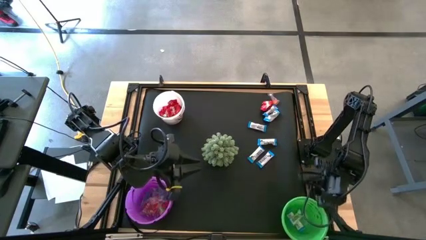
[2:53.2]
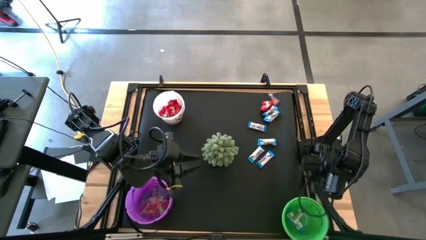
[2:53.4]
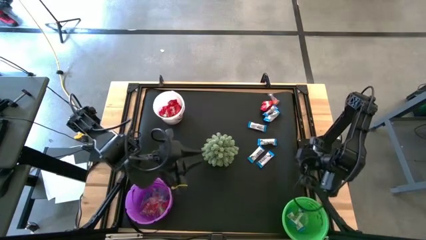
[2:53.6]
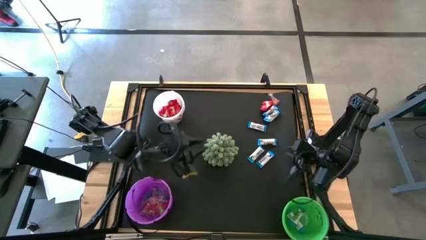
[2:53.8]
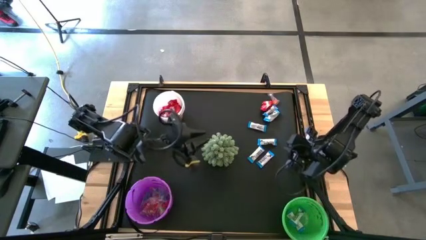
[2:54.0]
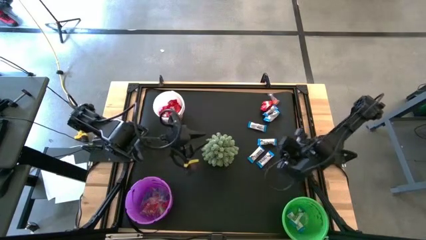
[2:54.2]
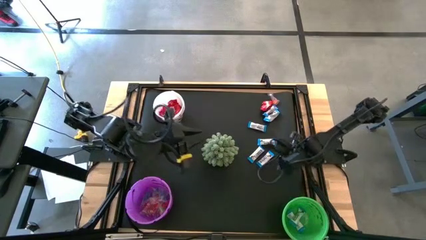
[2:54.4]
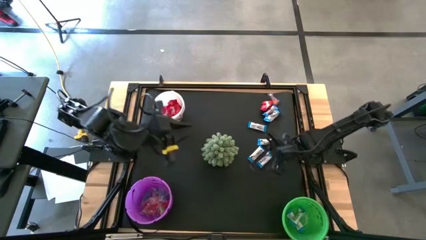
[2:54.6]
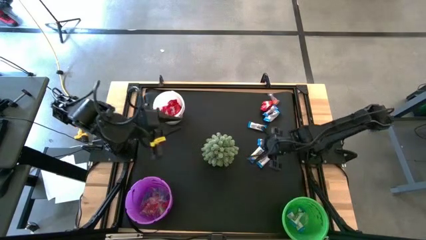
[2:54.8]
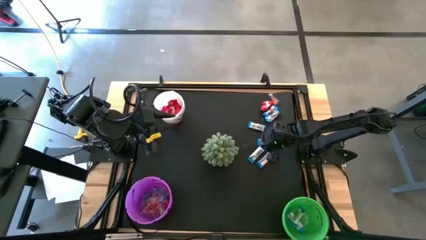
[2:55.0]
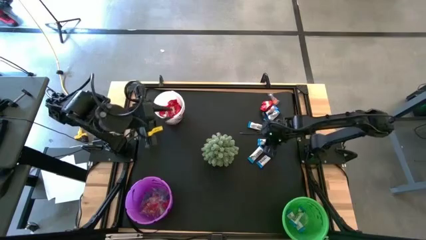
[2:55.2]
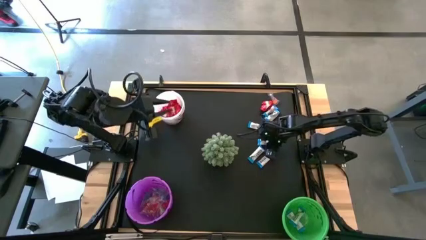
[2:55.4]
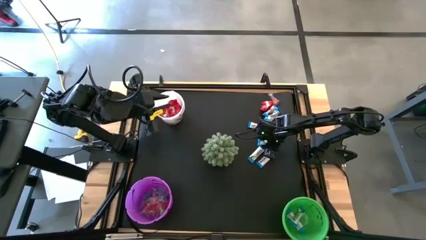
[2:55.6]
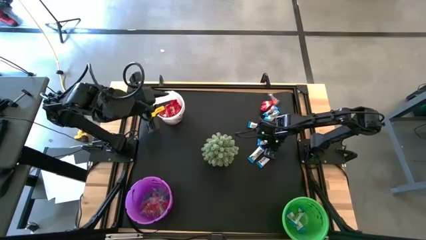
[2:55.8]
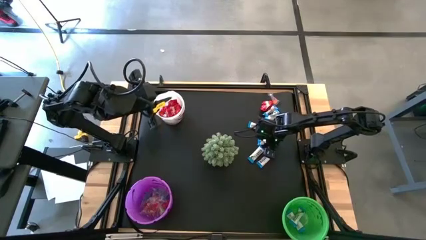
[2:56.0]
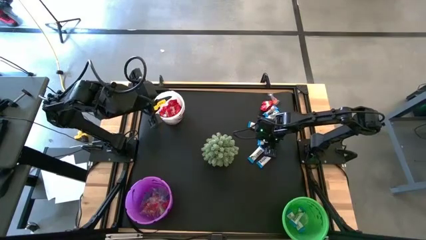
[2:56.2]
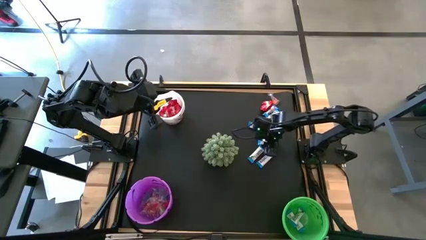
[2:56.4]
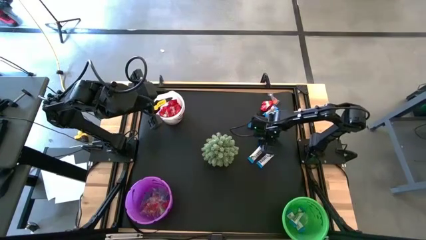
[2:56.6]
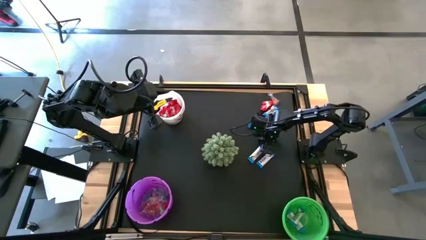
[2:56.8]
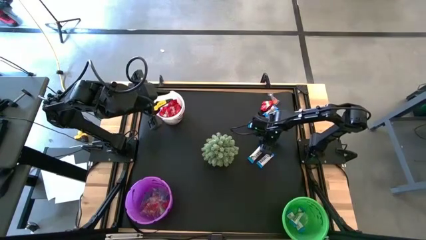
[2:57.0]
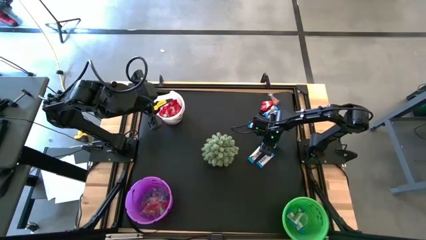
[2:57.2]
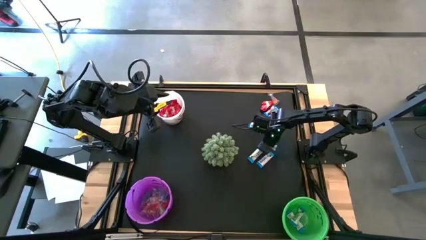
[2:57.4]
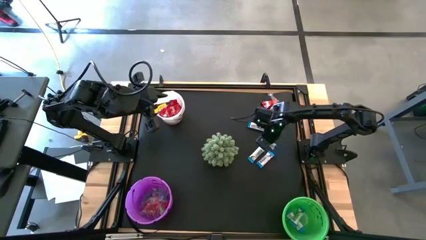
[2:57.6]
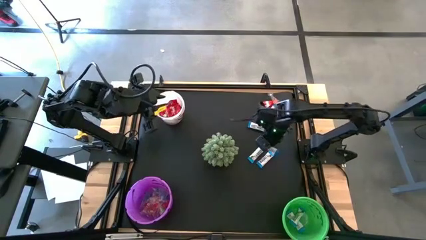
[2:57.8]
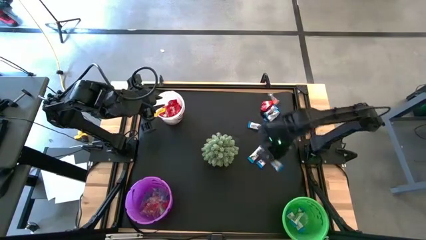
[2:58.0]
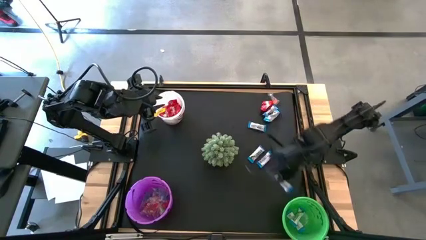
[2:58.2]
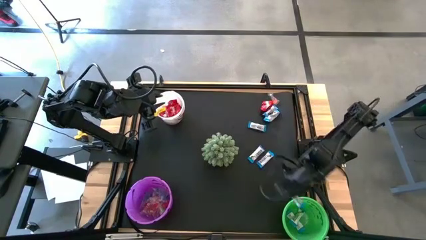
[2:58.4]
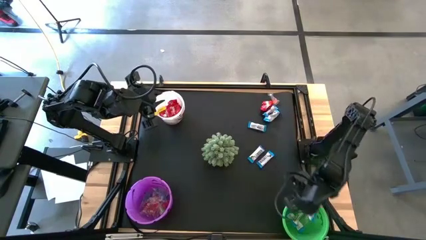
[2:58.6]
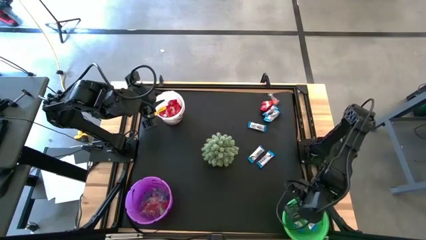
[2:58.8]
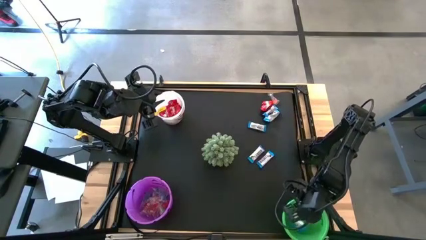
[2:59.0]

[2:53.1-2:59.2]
Task: Organize candy in baskets
Put the white chocolate bar into the green bucket

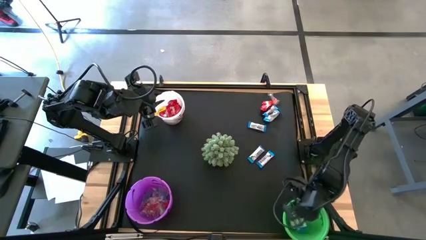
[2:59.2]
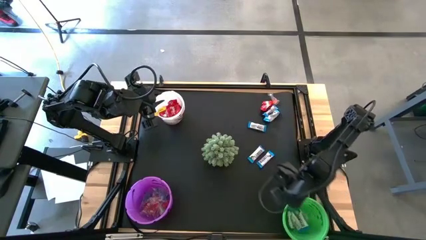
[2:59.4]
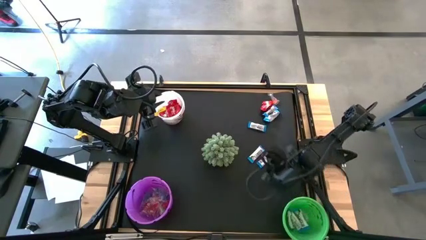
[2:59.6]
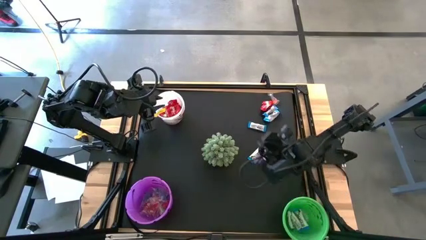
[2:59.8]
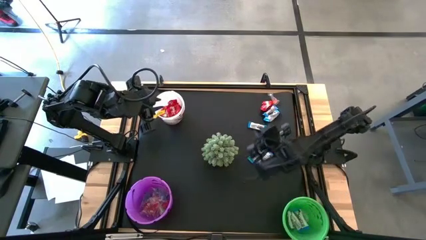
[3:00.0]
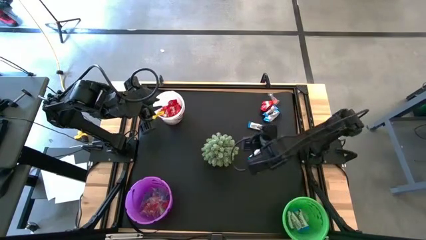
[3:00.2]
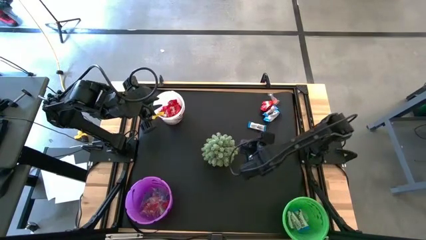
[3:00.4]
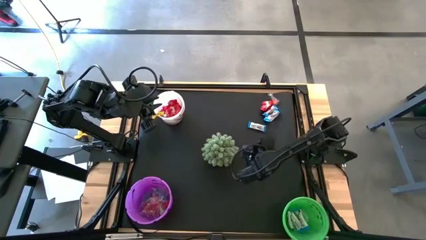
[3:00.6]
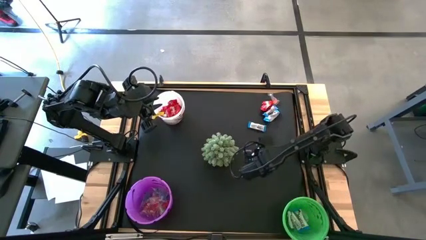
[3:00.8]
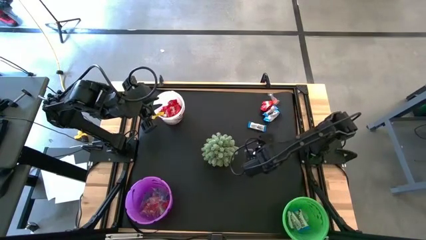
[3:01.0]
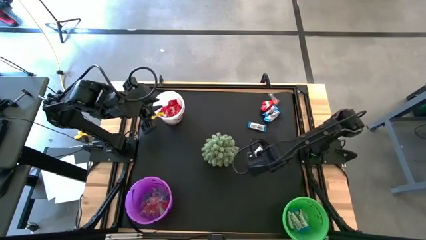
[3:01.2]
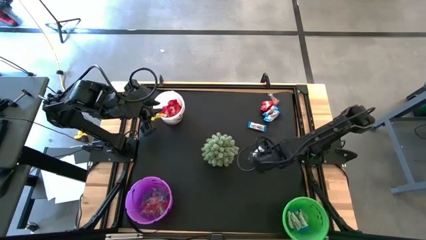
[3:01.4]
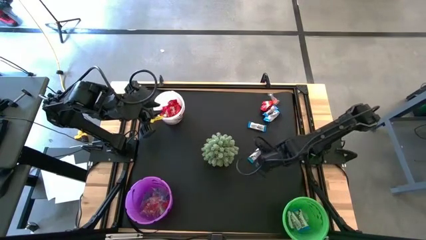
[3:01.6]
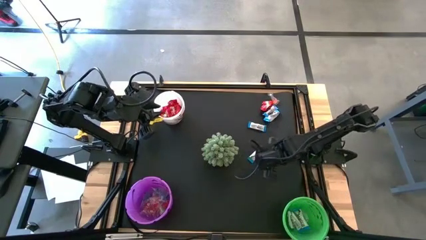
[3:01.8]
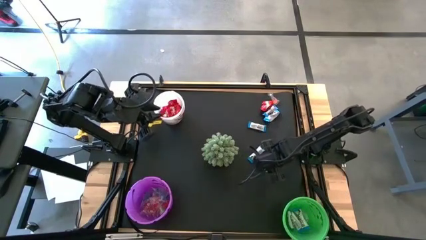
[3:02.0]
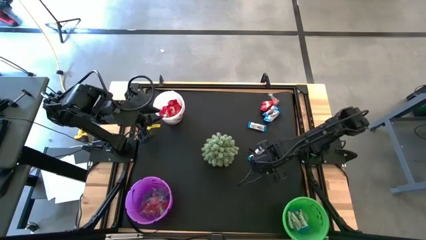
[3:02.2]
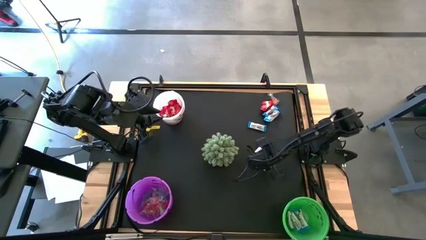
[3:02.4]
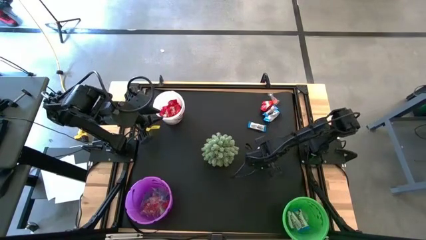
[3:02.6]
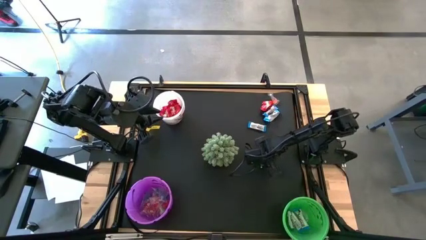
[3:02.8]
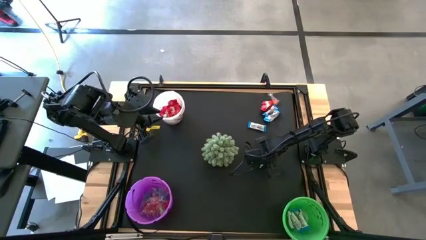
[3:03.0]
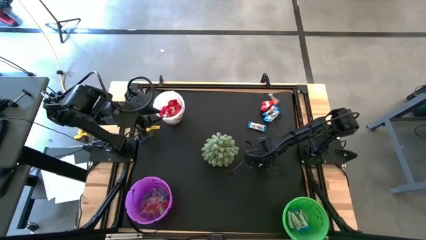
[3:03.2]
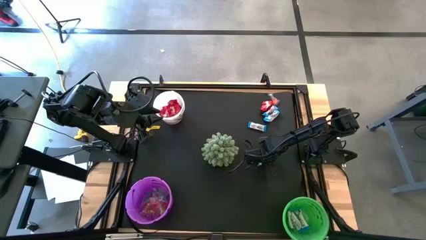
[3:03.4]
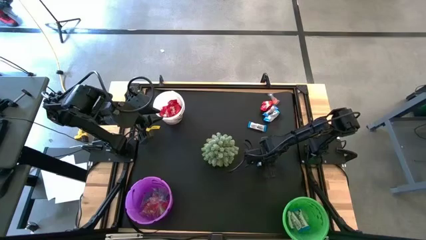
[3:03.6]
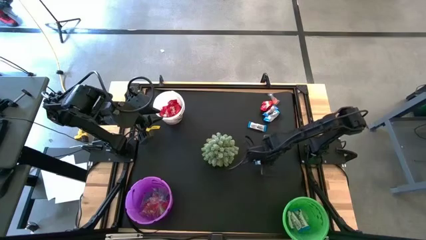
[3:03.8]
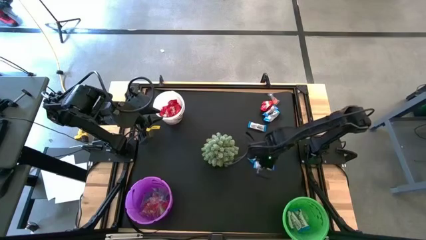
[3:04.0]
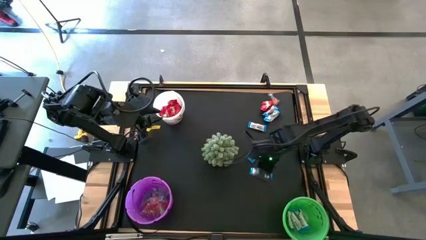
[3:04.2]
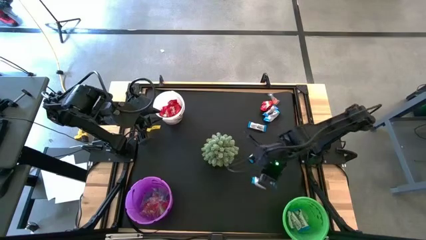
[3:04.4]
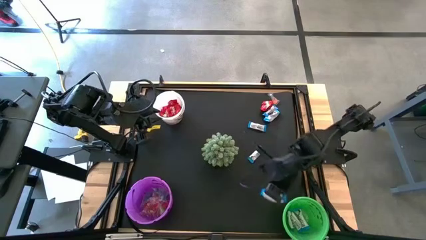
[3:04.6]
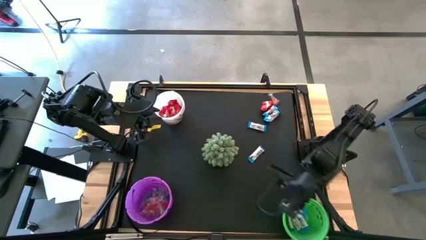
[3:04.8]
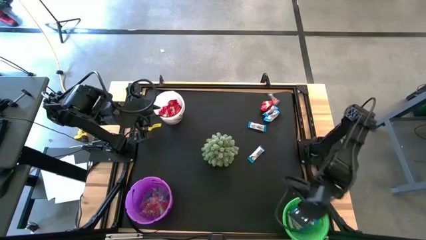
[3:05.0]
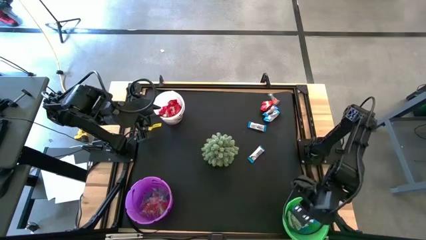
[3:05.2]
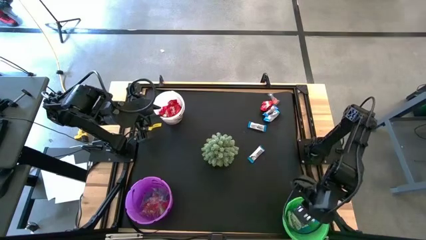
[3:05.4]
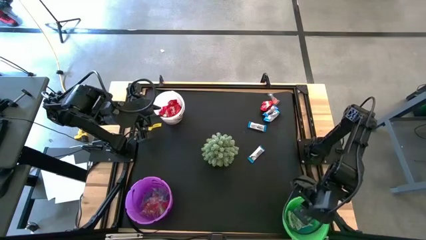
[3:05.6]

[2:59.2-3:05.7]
Put the white chocolate bar into the green bucket

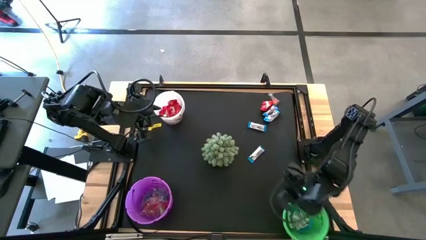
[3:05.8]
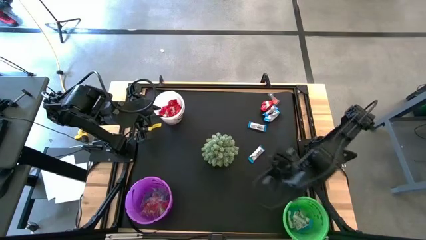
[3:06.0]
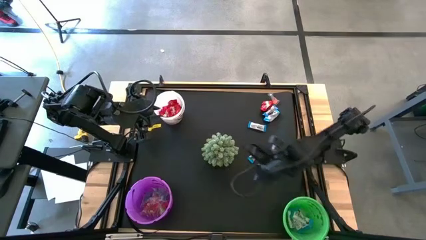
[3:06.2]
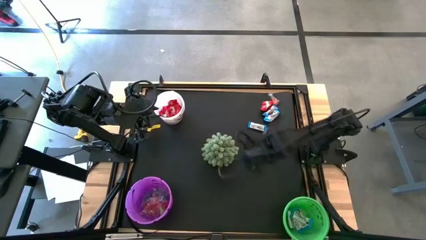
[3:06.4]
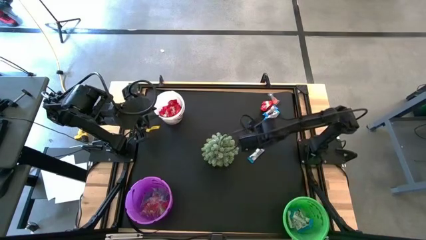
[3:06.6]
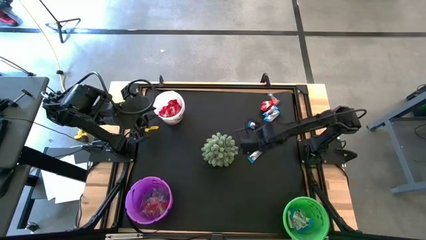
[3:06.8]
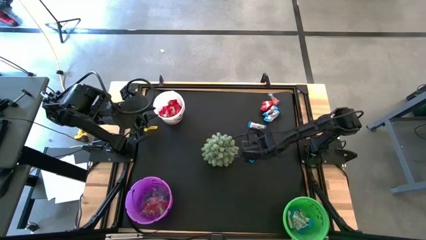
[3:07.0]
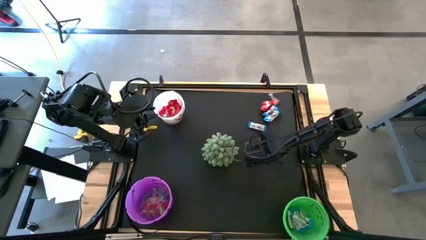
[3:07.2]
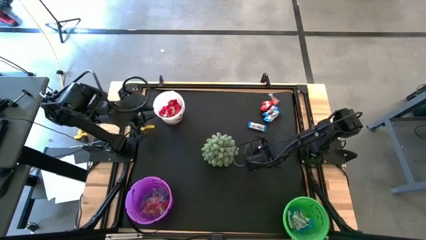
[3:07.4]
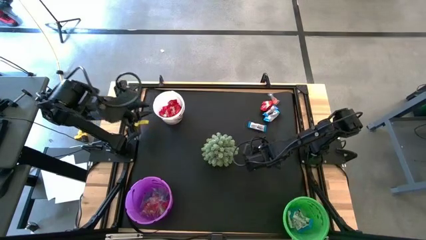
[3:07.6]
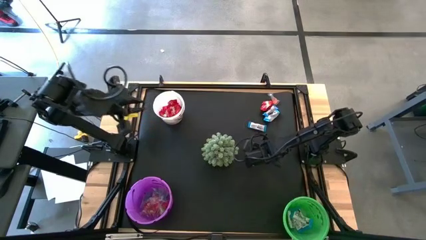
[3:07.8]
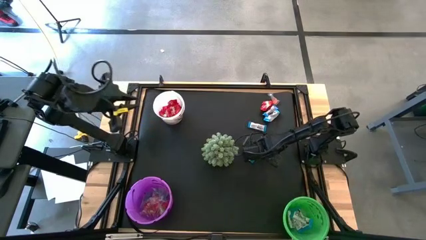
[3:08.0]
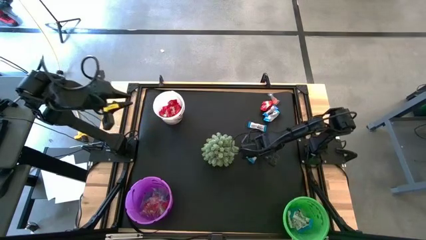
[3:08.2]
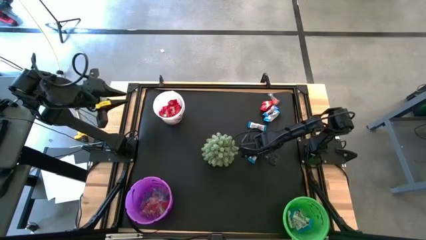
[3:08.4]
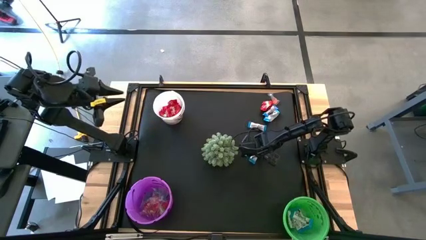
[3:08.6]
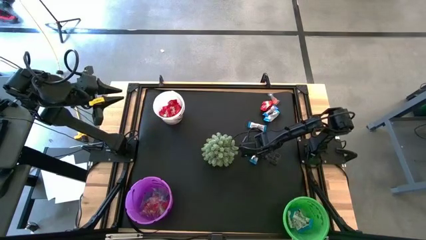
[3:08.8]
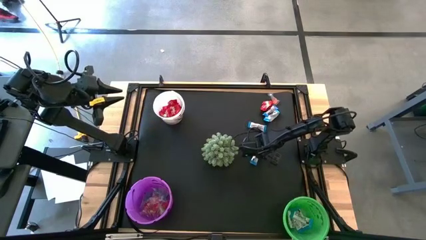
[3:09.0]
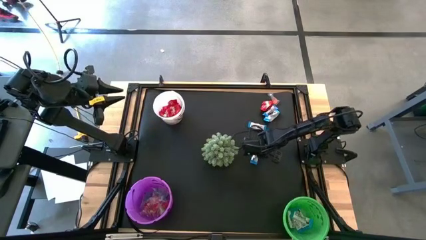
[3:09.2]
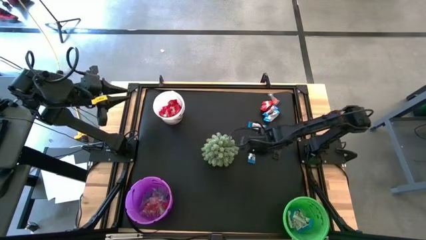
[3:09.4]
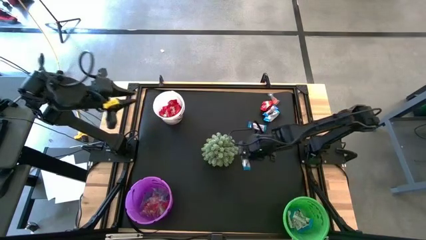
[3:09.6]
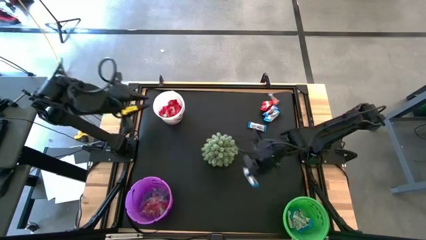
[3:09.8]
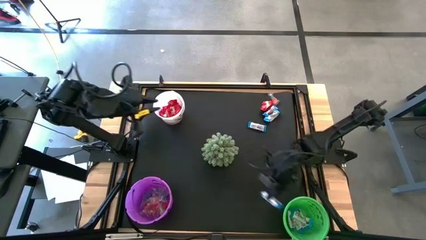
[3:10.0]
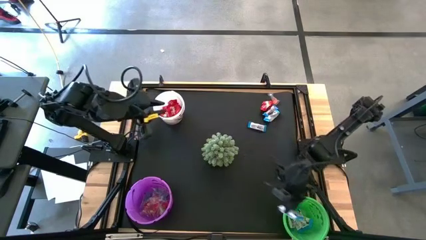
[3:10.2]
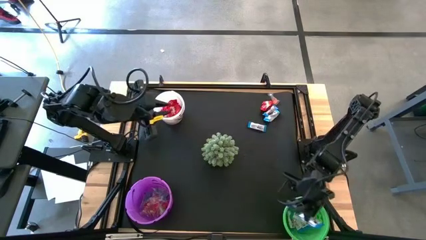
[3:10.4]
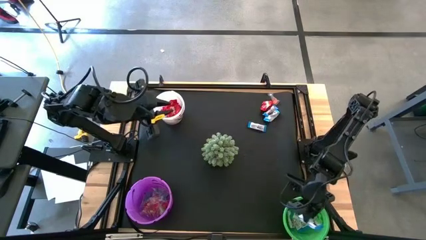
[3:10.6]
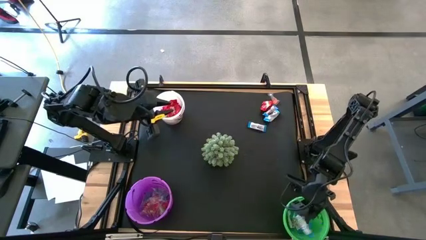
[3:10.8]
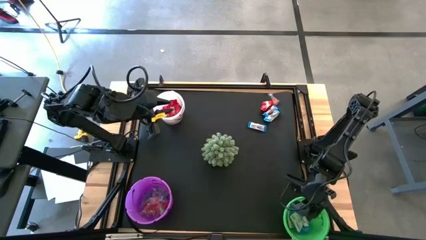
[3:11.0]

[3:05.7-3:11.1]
Put the white chocolate bar into the green bucket
